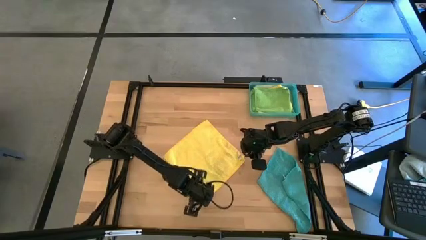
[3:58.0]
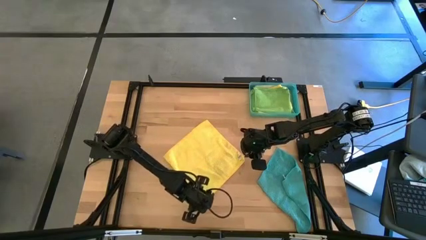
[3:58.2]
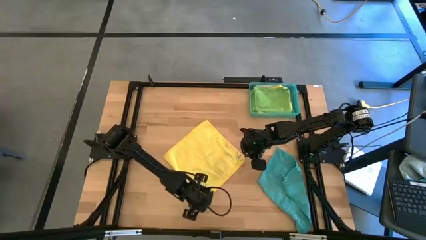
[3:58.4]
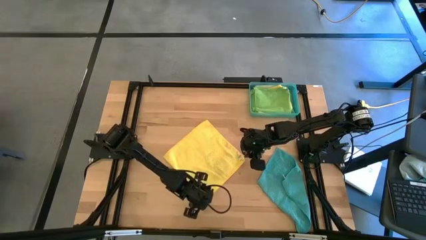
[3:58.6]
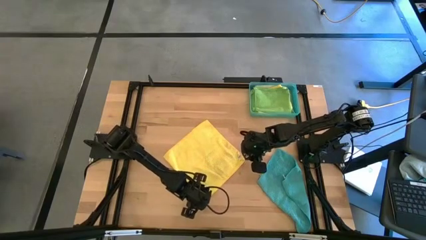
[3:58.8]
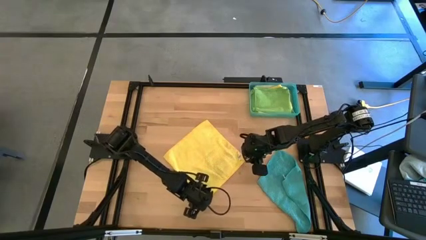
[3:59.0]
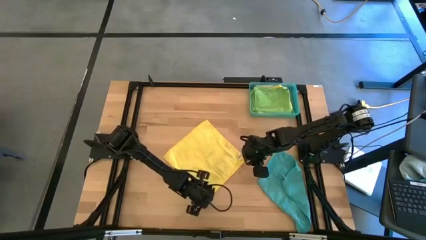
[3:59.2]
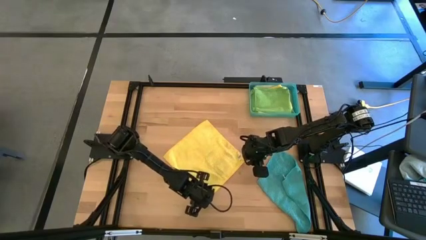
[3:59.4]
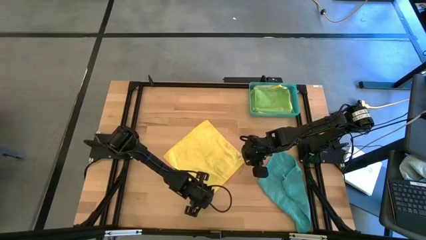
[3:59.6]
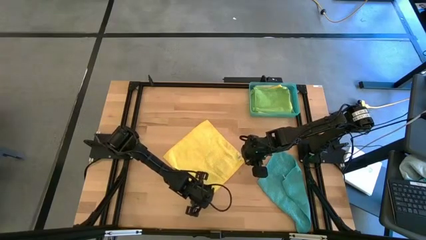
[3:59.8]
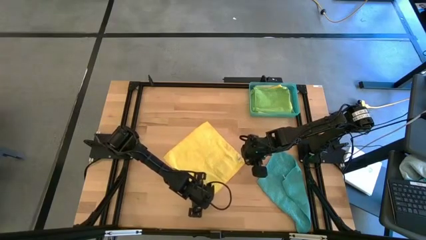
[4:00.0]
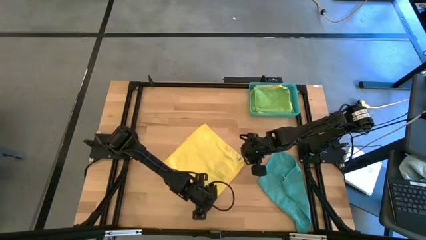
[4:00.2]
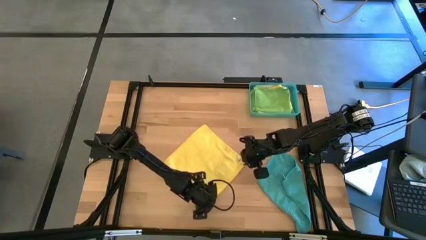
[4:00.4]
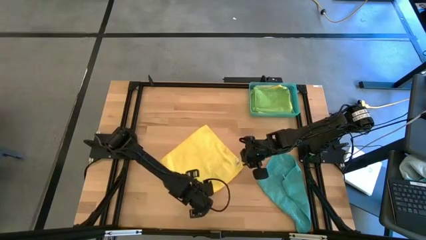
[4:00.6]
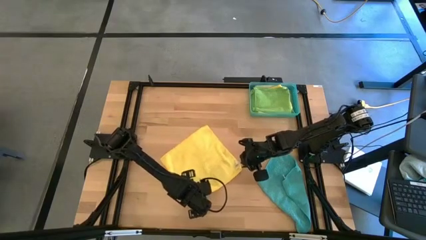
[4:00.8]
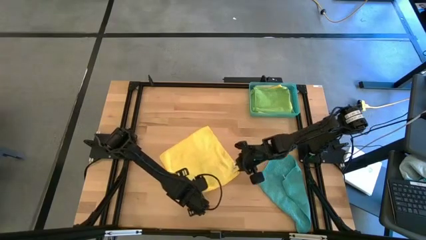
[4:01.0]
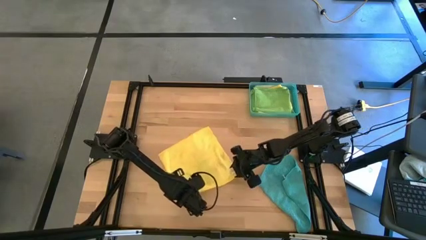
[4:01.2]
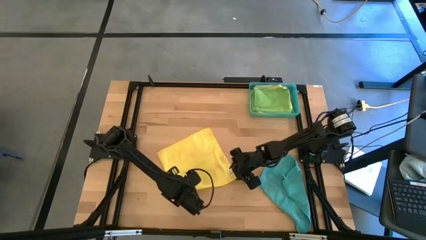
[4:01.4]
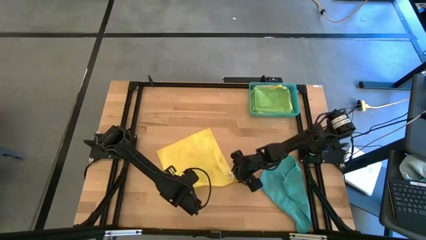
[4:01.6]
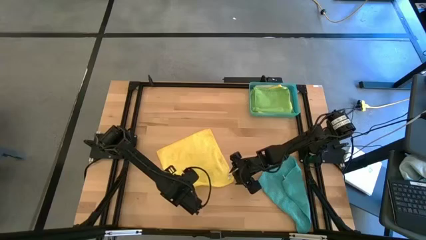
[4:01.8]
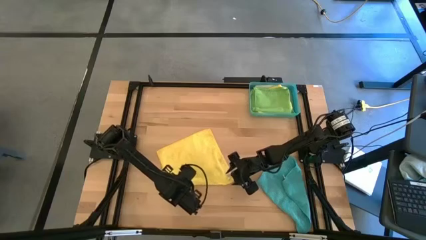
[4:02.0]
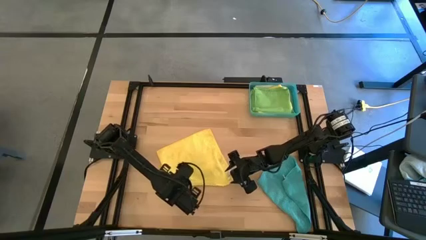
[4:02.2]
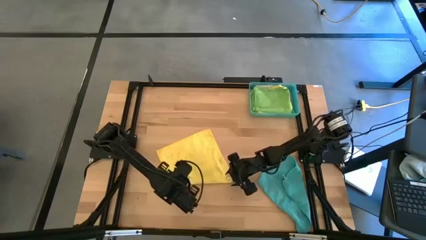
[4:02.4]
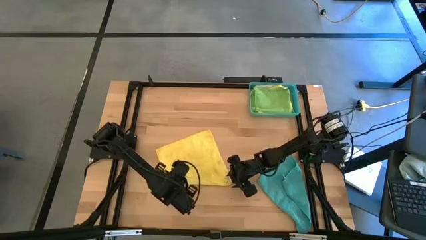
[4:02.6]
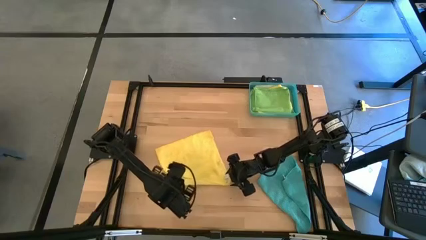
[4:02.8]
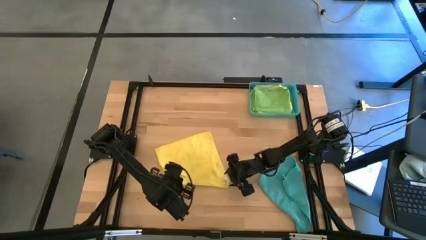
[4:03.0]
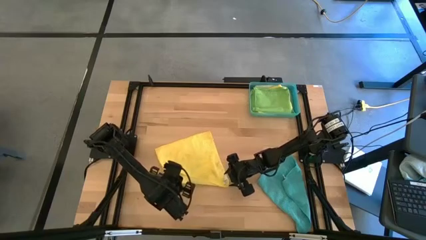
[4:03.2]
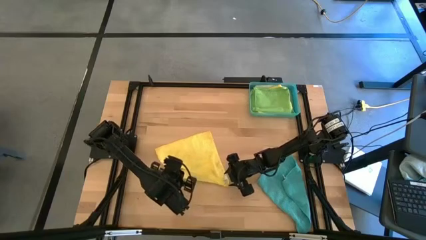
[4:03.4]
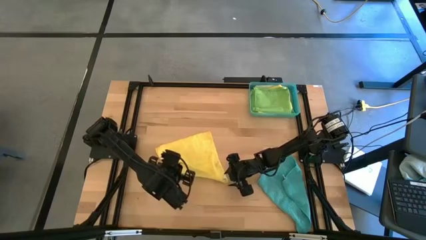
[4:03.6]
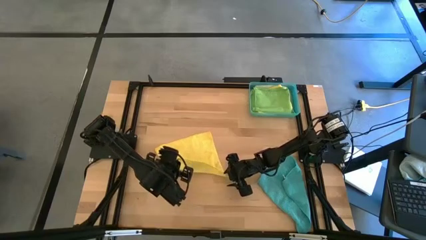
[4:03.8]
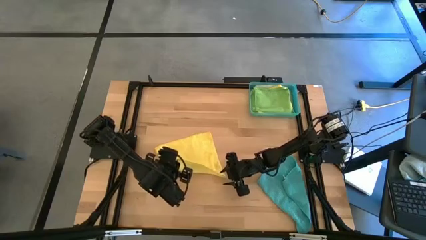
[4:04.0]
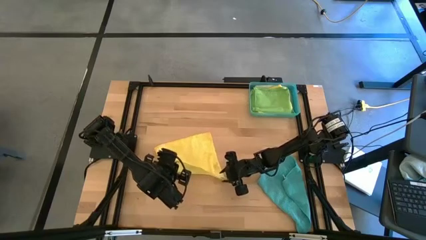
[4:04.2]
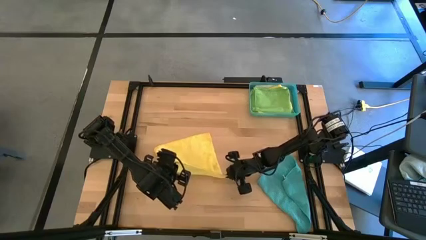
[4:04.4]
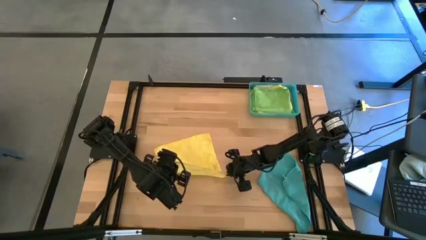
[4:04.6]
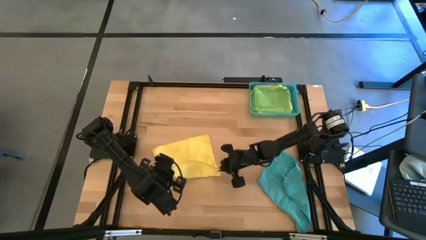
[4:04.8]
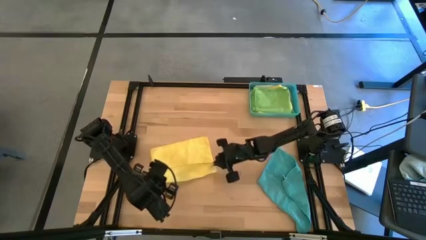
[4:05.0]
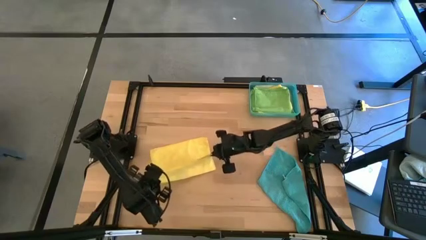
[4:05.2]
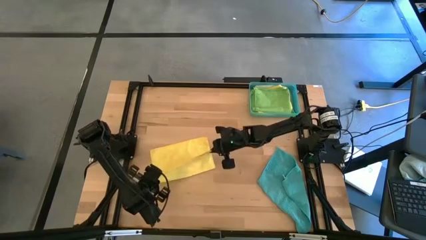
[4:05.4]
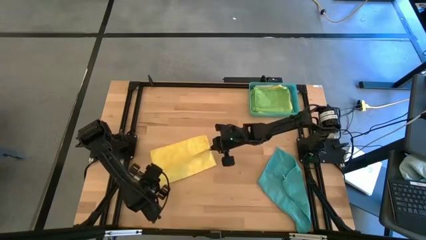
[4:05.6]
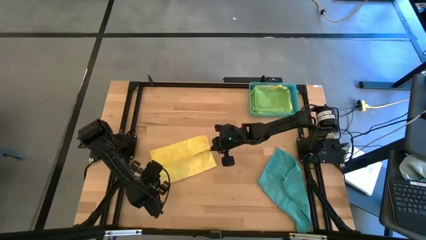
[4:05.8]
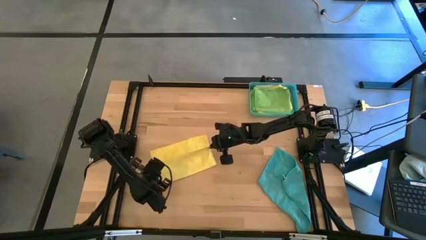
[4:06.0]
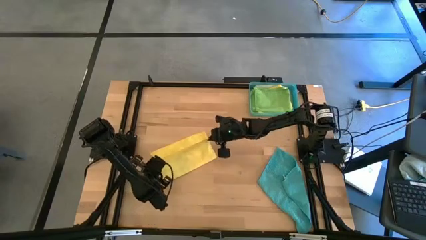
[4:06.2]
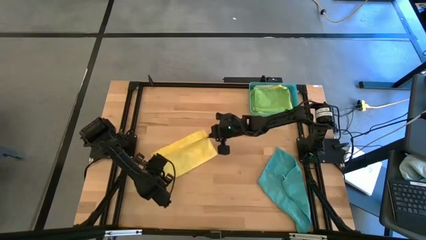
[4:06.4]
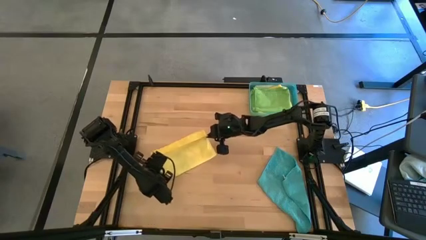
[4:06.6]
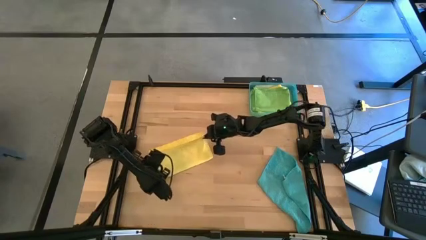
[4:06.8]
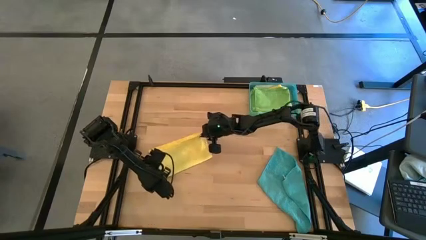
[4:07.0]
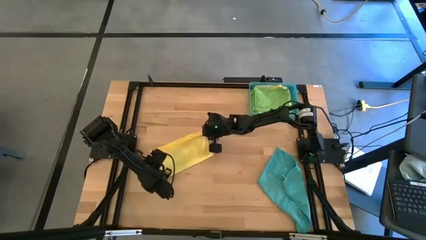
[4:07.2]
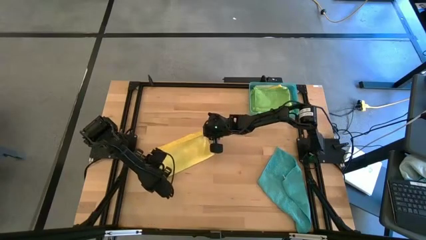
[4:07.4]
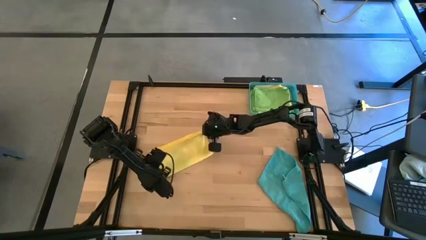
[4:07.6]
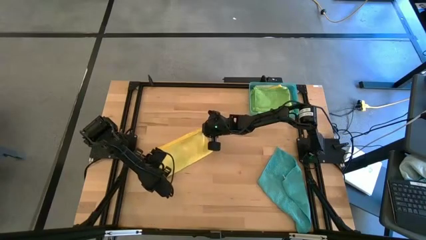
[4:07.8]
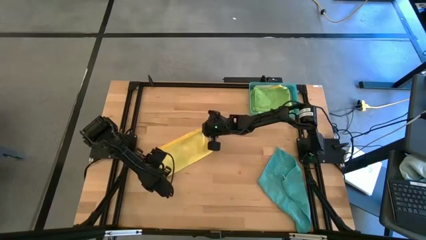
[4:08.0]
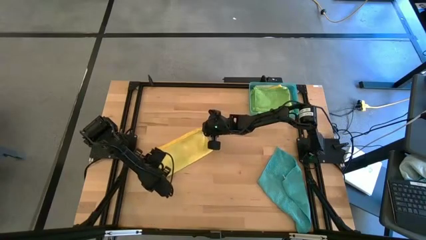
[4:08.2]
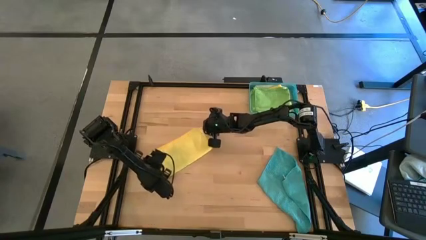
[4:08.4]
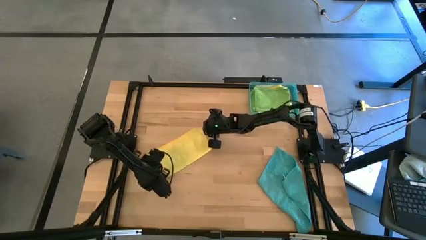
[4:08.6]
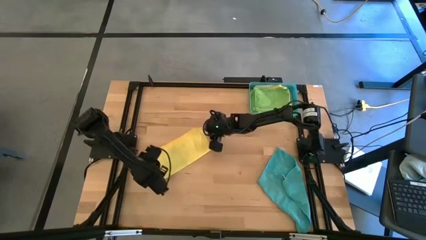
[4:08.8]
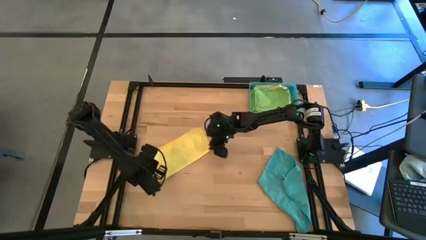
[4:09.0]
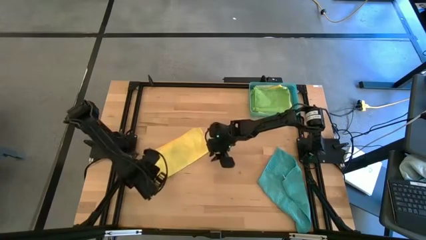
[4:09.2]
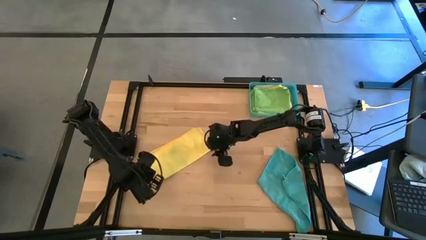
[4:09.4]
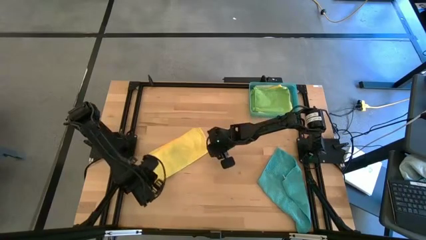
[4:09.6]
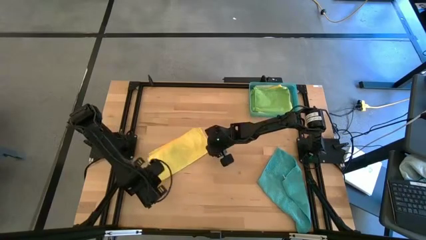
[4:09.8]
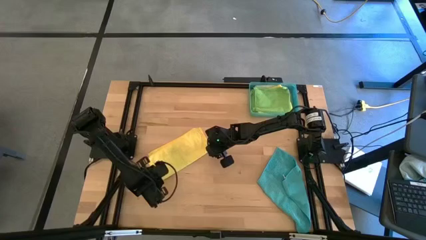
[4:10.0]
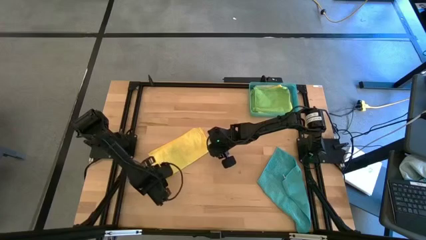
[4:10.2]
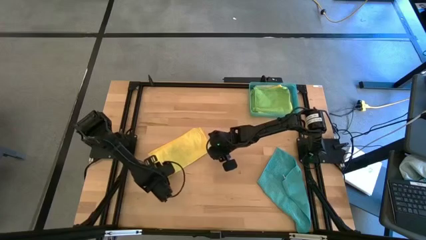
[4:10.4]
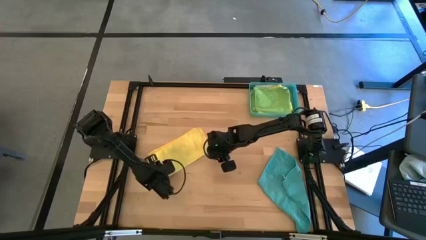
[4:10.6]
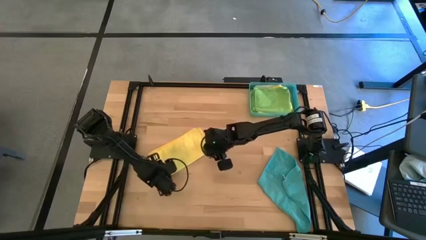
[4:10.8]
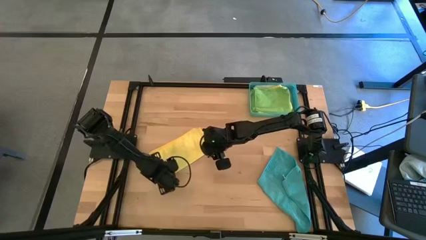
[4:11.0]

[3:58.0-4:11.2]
Task: Fold microfiber towels
Fold the yellow microfiber cloth
